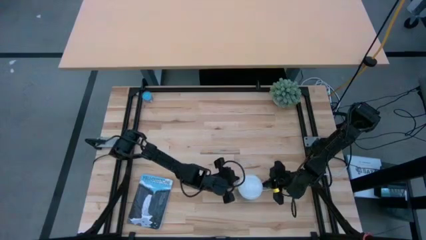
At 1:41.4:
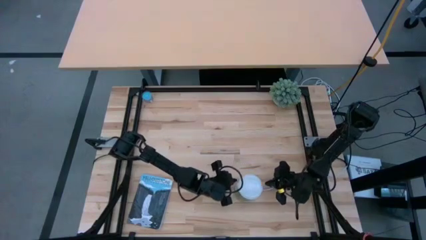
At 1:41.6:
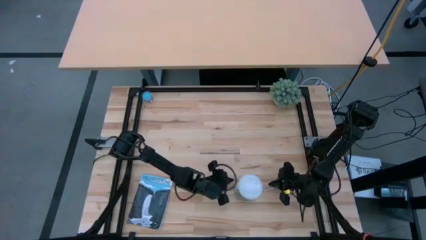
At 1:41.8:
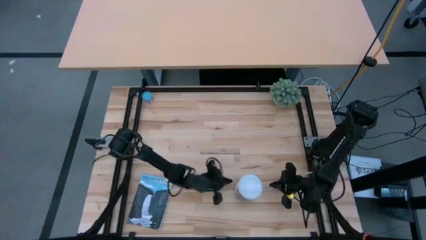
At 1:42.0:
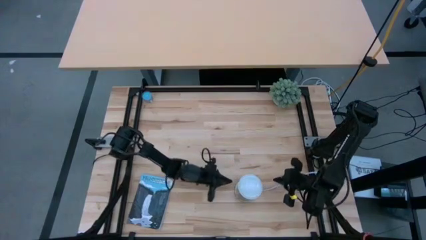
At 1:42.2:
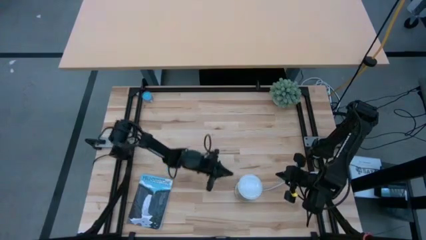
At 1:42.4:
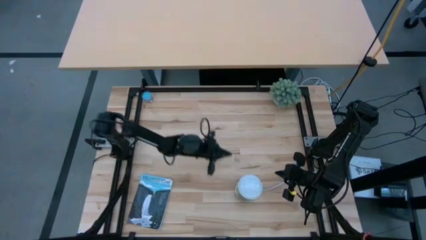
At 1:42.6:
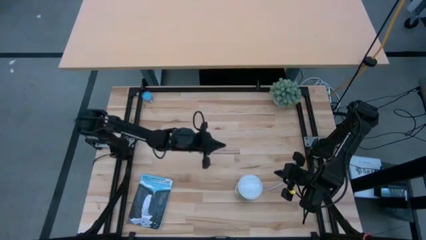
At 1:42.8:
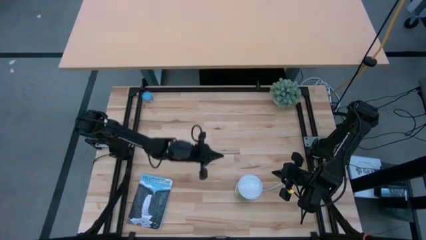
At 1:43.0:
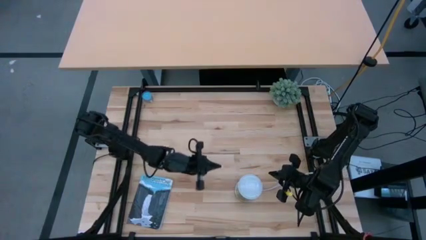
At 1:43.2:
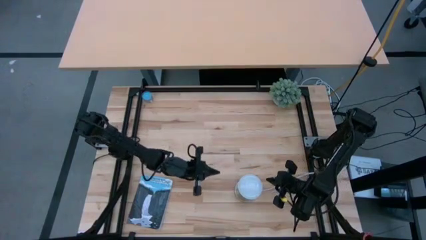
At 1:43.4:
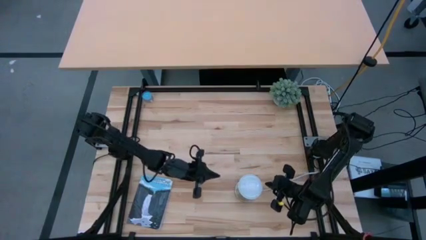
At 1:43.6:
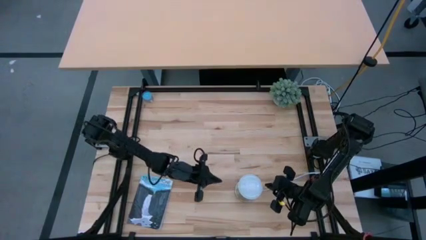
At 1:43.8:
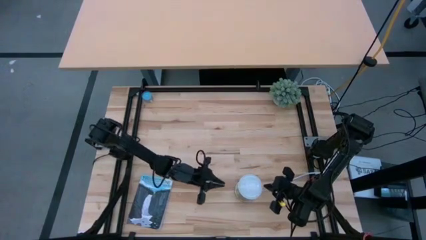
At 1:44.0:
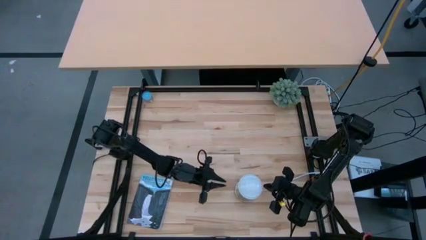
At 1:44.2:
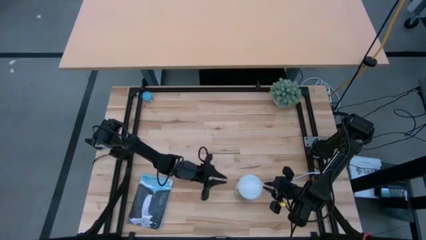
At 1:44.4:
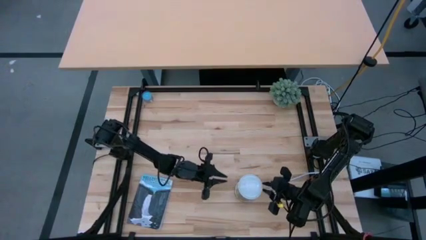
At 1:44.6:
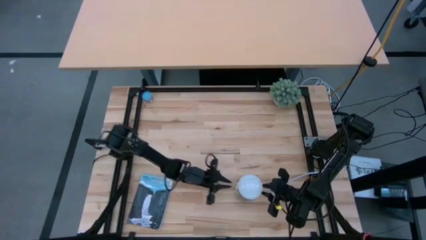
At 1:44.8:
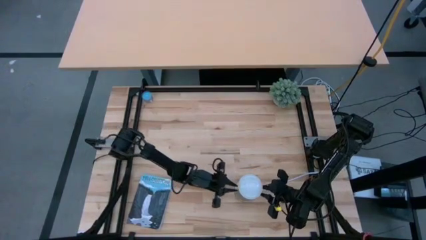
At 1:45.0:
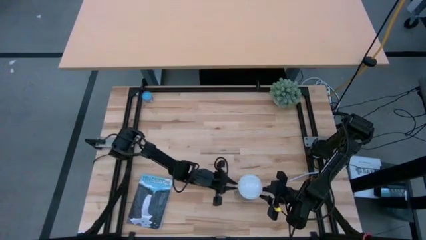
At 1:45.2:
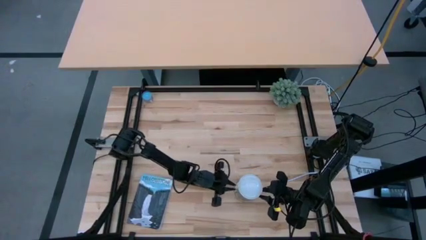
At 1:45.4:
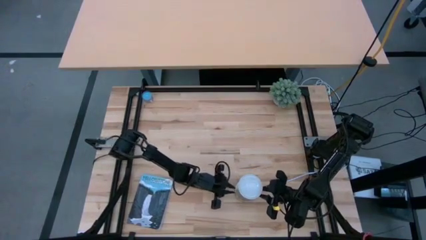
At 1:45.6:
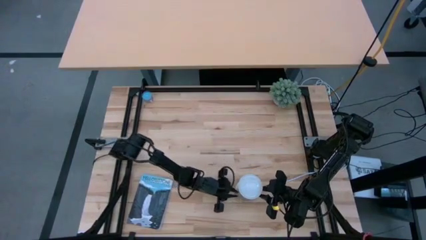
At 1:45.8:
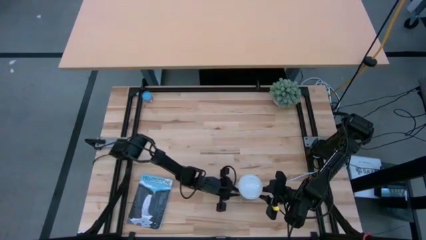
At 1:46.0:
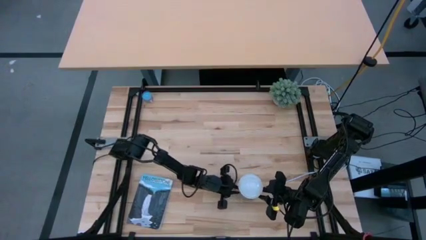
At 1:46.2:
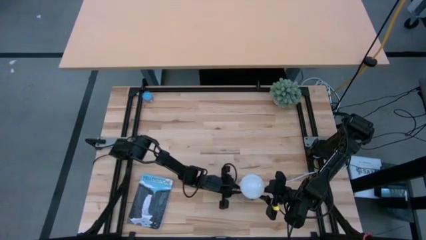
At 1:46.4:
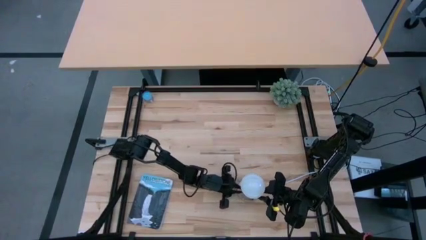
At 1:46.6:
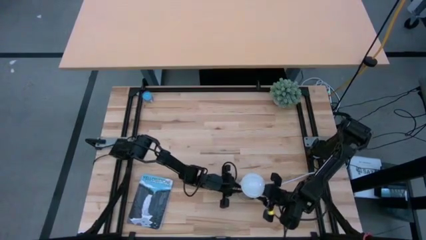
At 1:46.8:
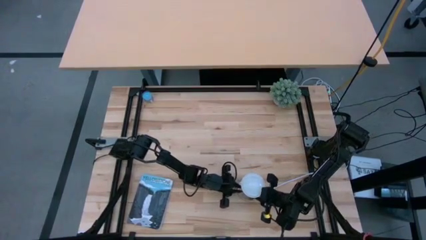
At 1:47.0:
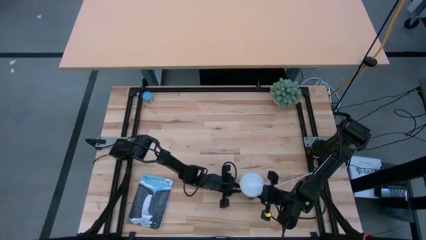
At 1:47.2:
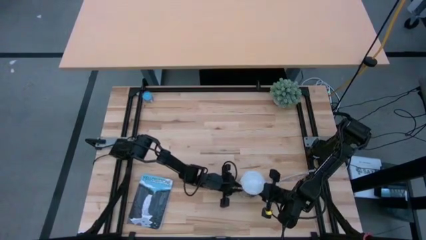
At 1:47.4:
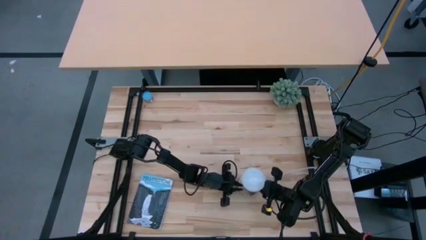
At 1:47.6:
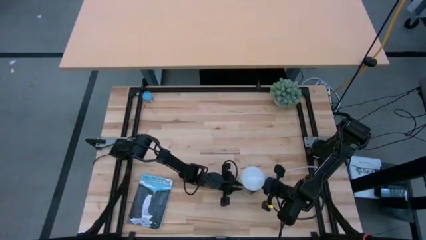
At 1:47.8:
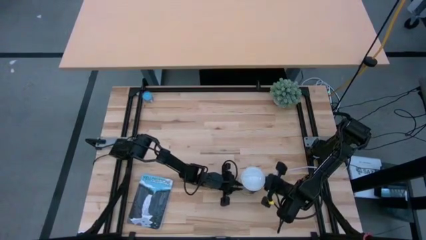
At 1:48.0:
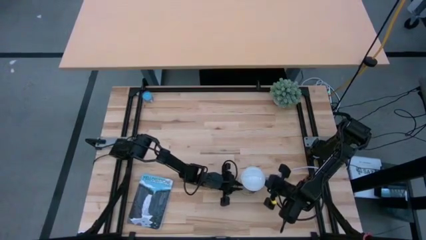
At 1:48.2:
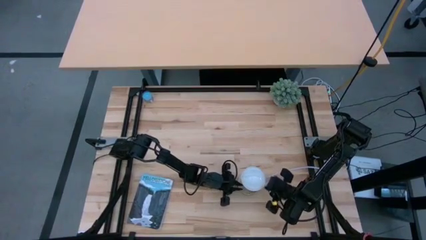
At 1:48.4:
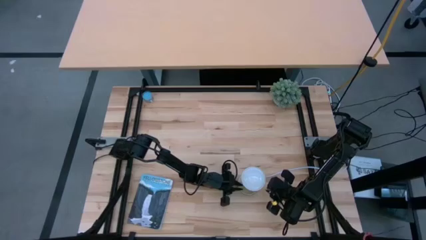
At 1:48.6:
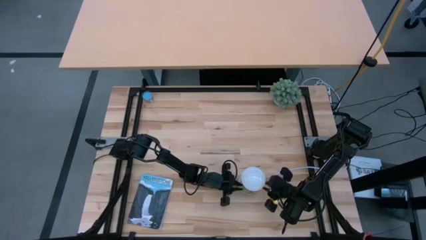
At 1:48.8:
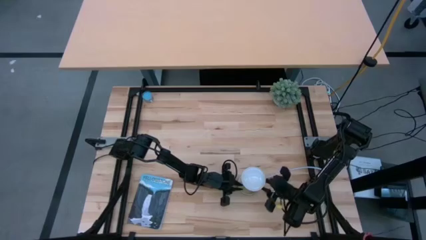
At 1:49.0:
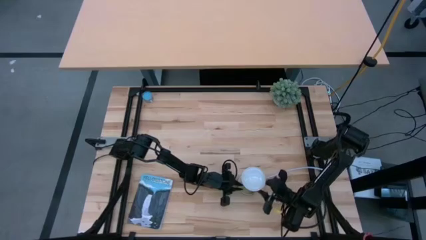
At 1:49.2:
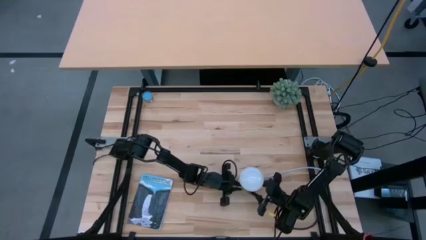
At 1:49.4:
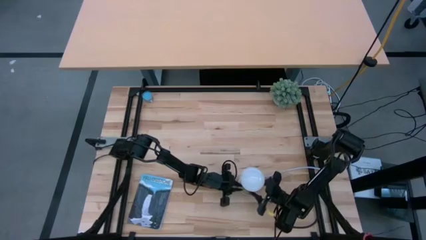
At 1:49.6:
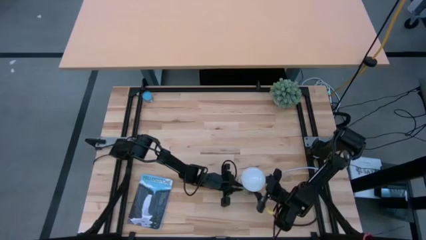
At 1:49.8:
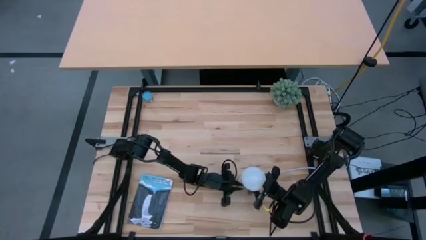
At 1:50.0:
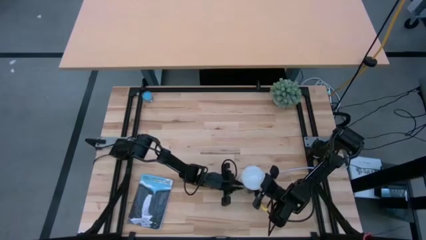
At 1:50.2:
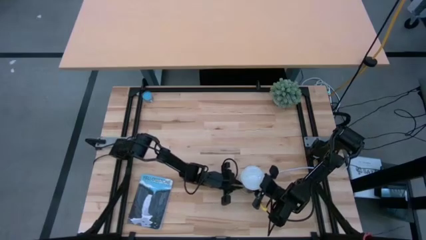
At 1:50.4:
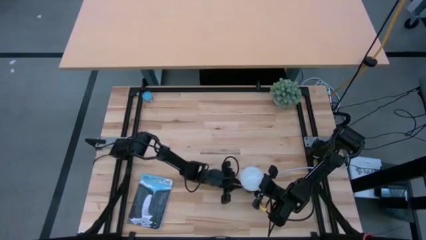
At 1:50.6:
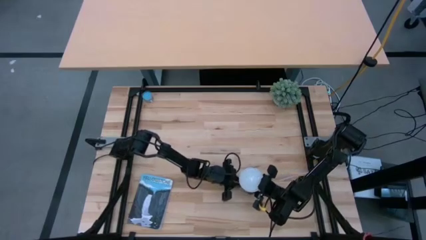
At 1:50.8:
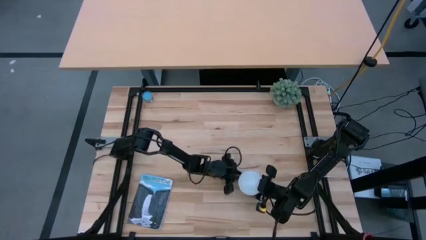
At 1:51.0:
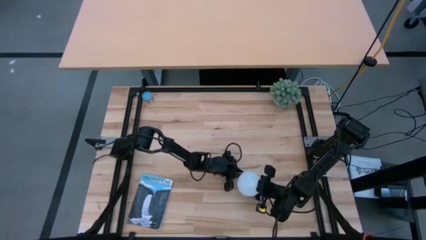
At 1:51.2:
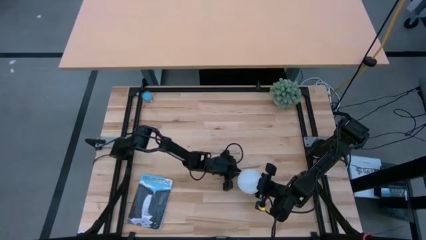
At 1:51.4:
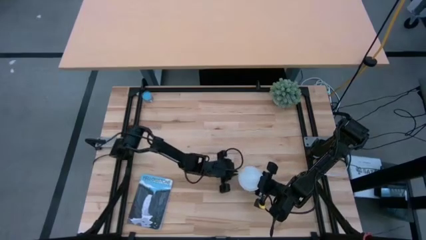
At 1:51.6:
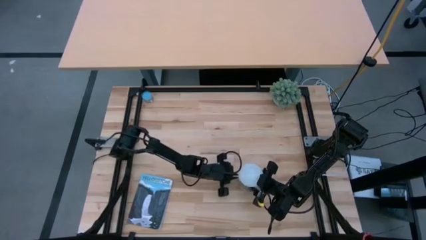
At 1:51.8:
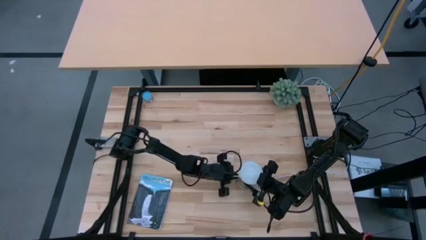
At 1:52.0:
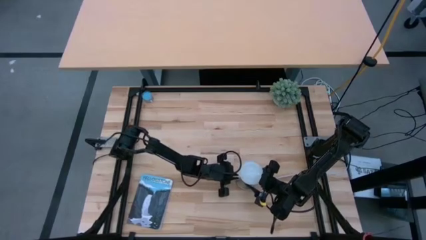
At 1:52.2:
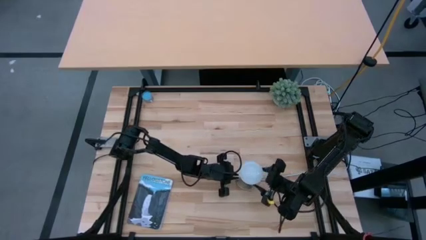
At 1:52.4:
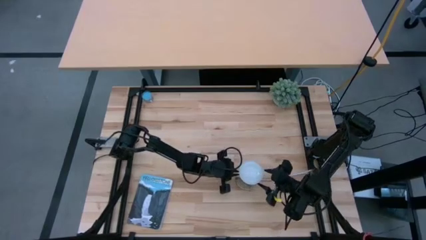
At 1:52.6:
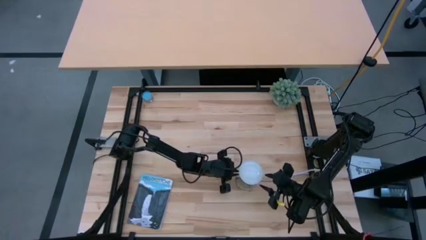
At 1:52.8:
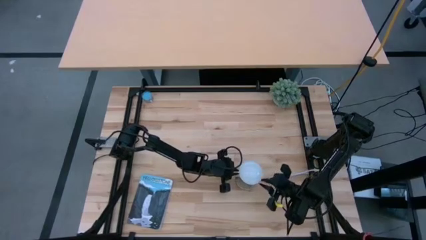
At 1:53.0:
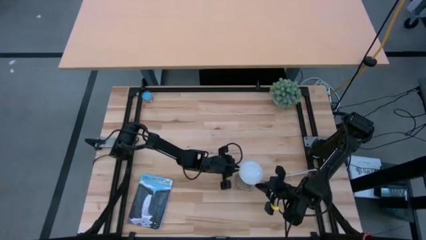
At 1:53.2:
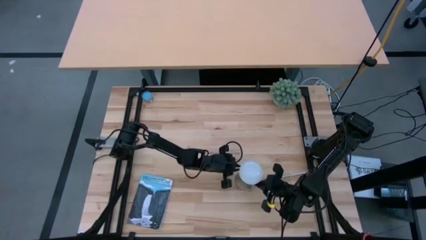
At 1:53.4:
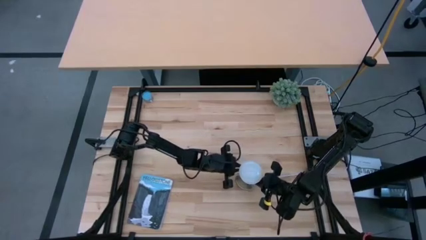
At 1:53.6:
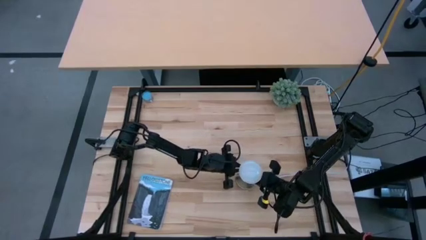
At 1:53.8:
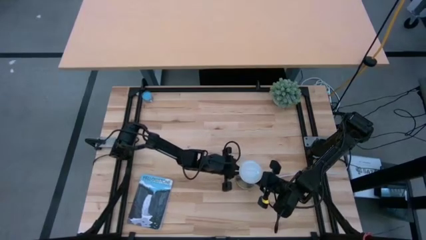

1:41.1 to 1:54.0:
Task: Screw lightbulb
Remove the lightbulb from the bronze lamp socket

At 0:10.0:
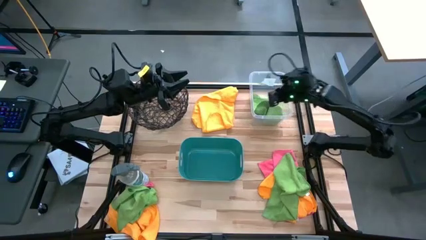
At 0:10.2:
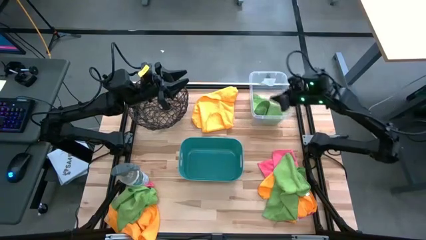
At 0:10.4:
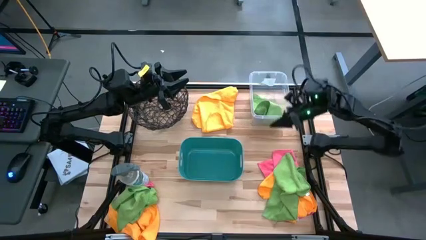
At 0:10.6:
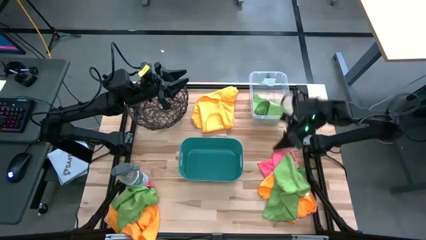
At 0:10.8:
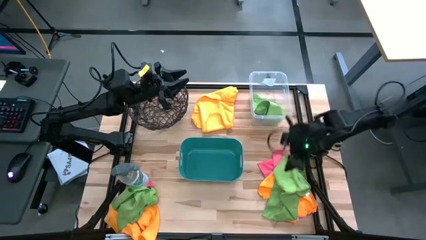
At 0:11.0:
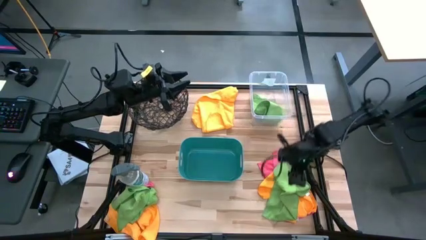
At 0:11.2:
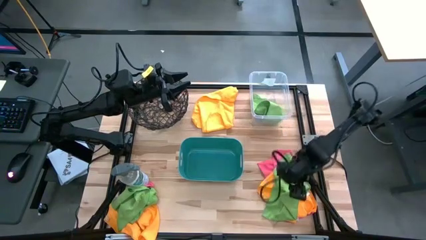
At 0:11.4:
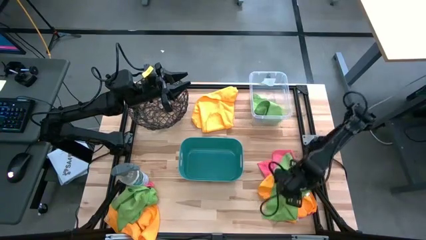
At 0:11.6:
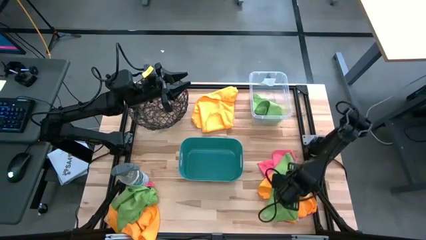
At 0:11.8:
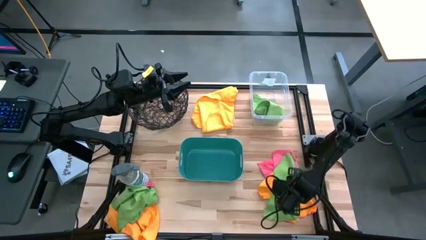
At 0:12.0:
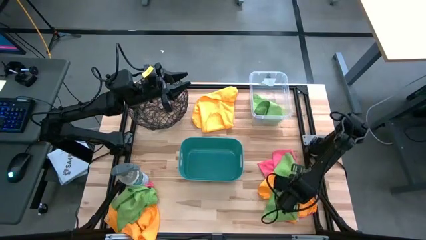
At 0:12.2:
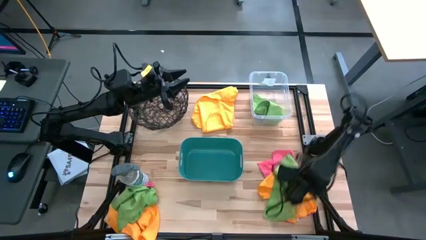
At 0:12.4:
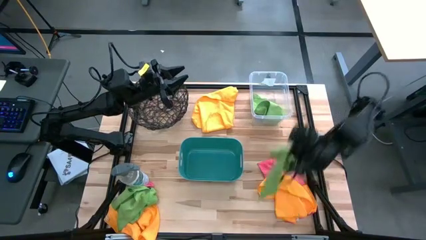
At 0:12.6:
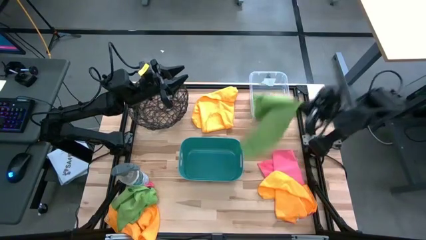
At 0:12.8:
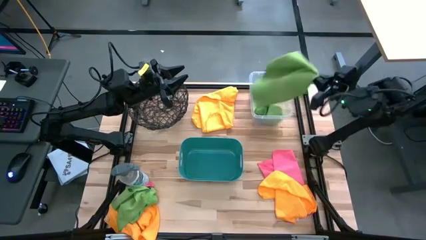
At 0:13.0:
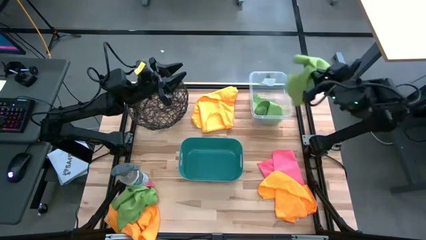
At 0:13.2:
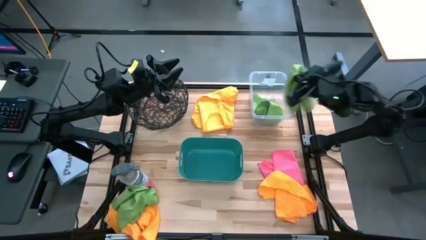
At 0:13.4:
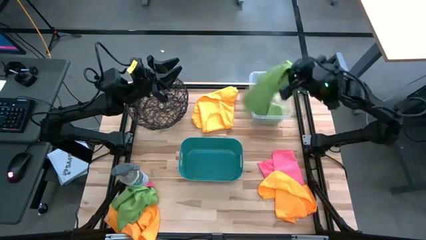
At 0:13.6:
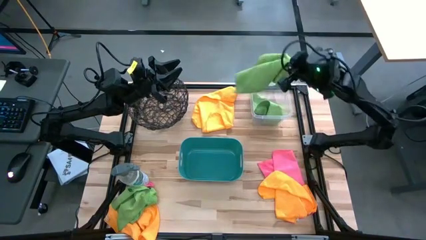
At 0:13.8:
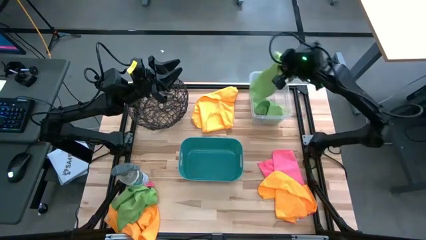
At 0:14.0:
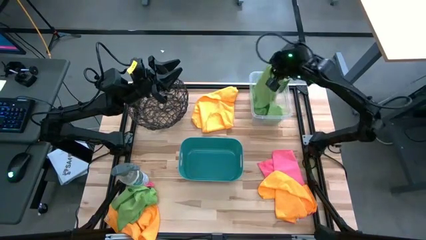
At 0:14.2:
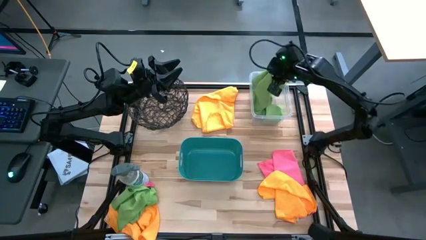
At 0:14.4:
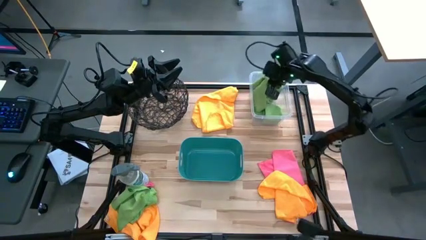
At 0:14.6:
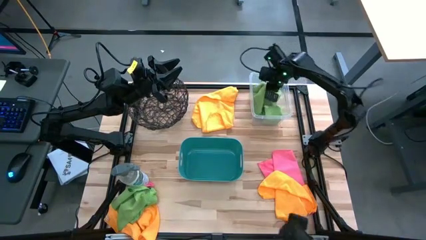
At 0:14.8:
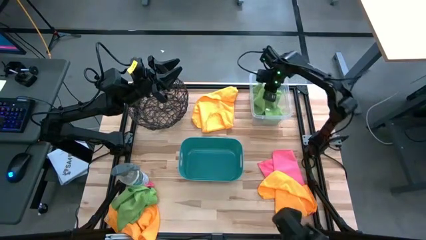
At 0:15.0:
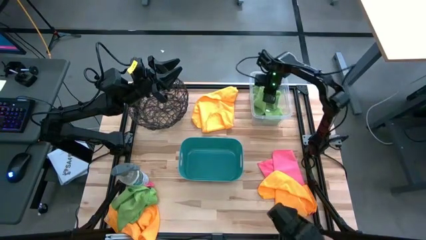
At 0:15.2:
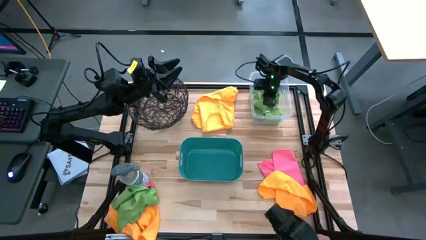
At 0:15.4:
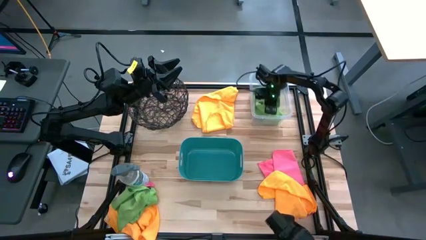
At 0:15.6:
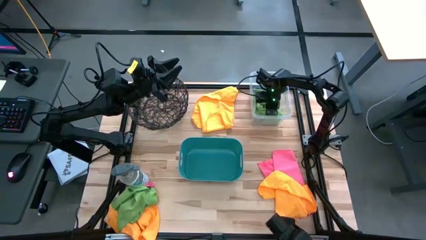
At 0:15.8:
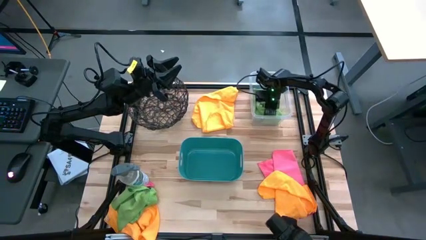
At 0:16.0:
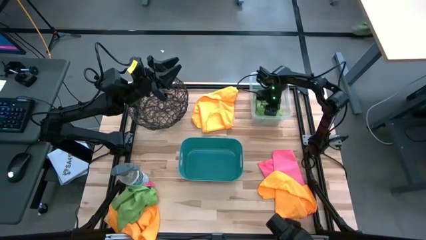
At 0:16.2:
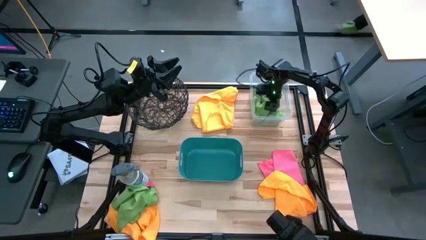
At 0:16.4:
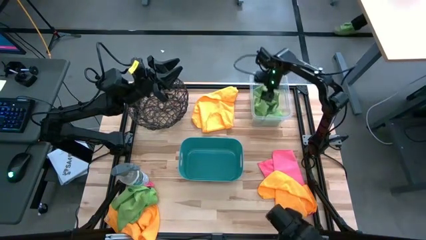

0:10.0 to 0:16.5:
Task: Sort microfiber towel by color & place in baskets
Put the right green microfiber cloth into the transparent bin
